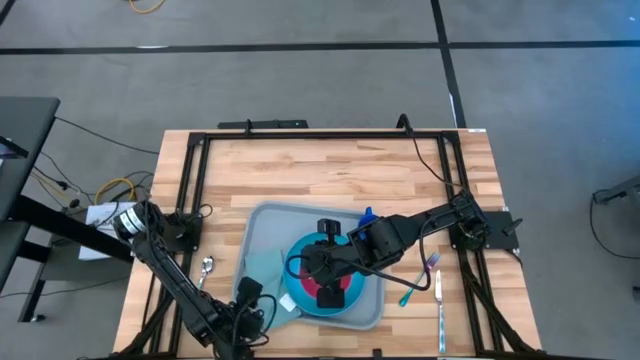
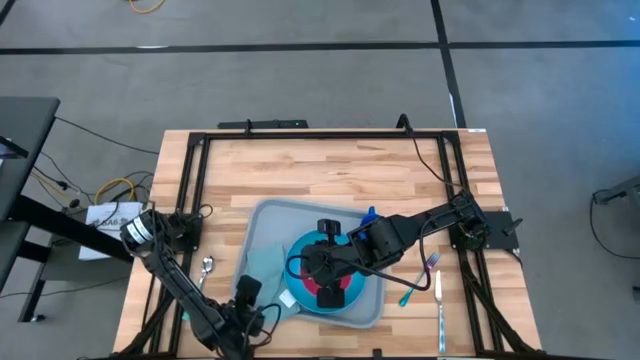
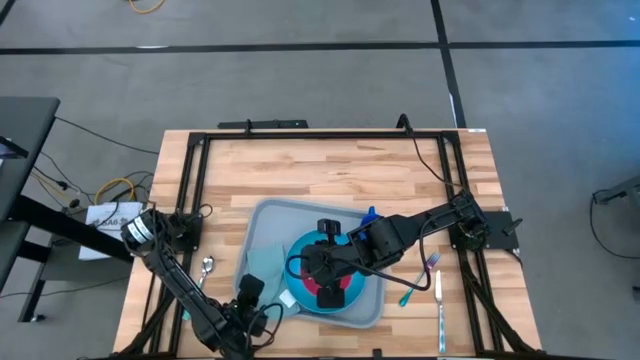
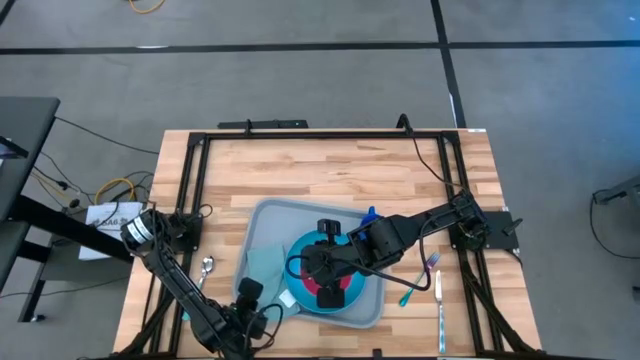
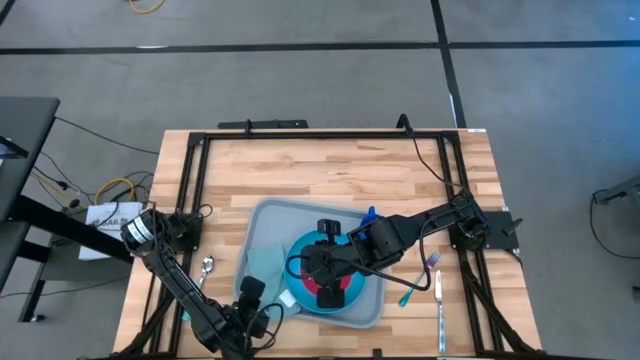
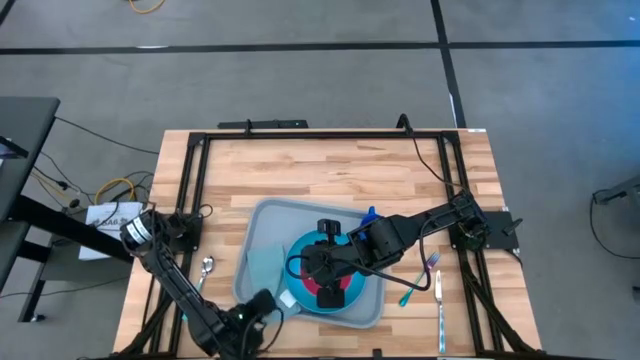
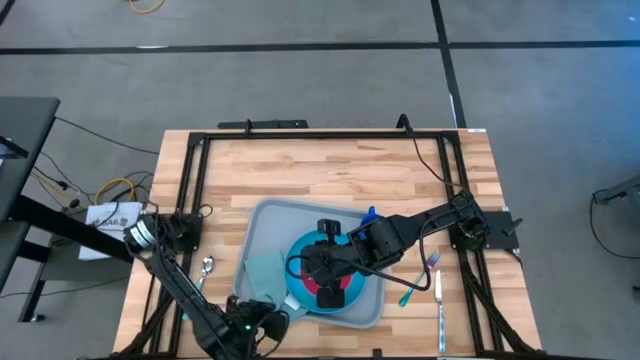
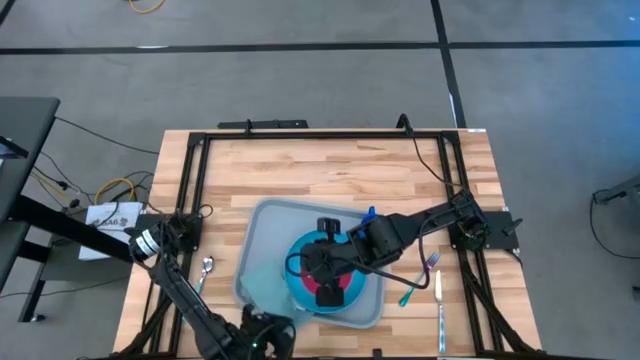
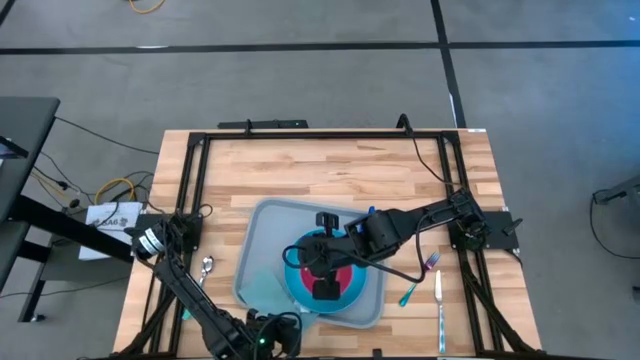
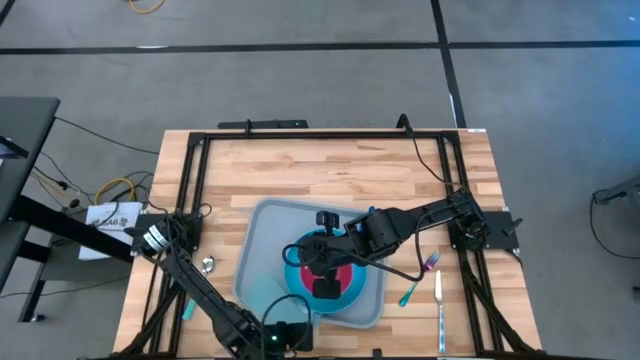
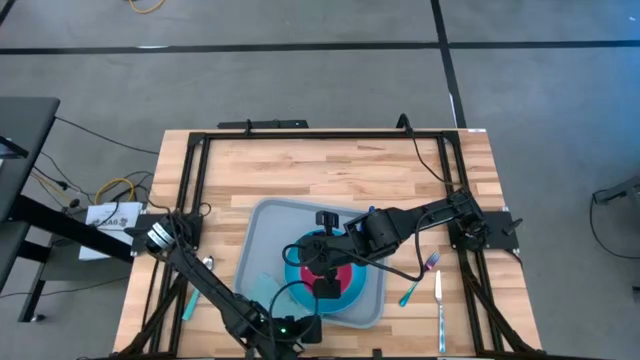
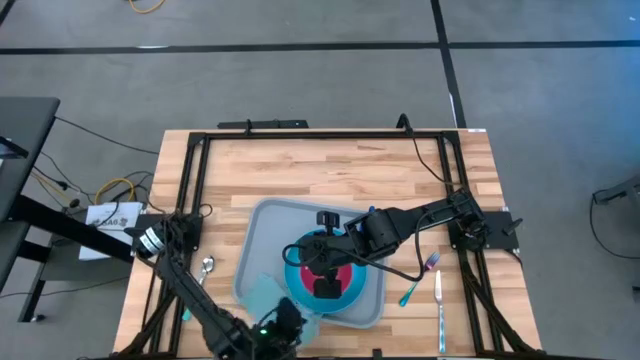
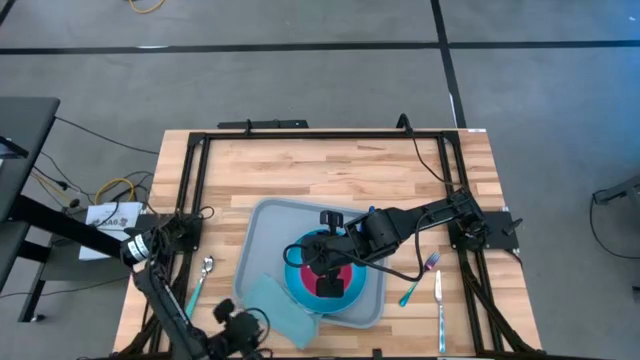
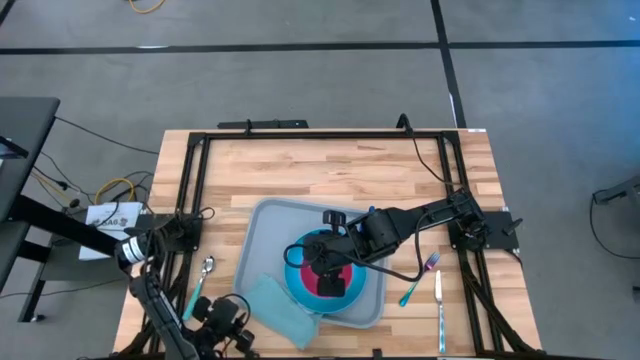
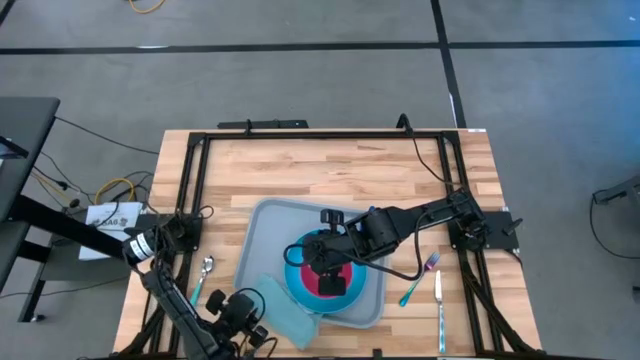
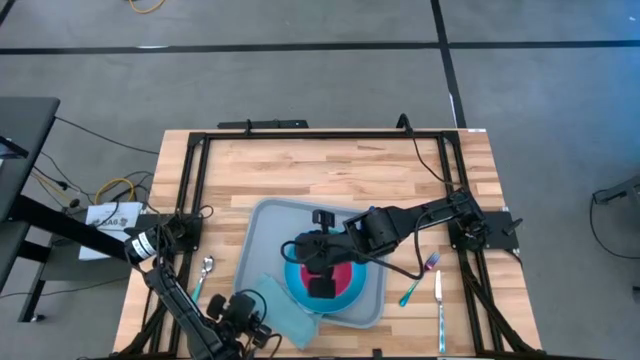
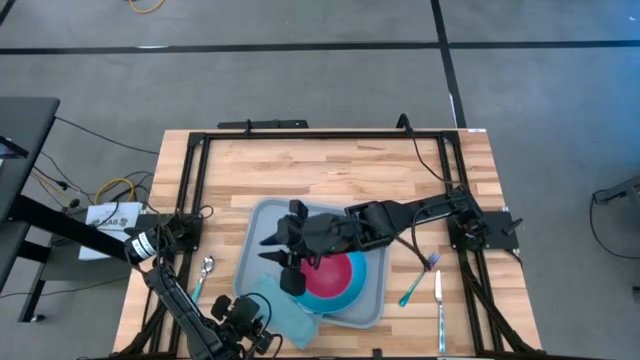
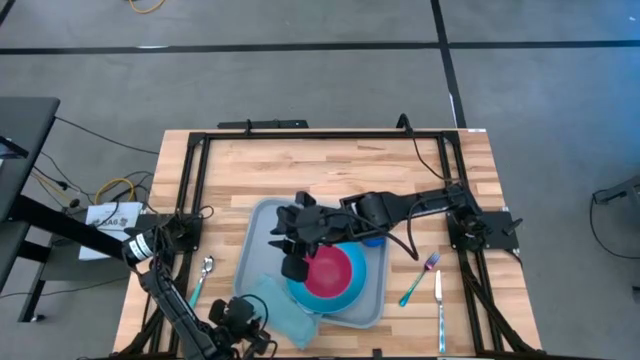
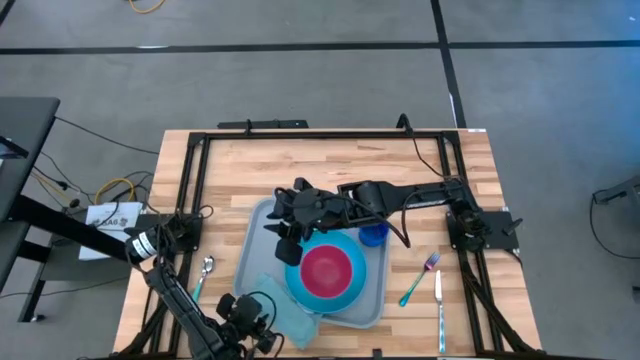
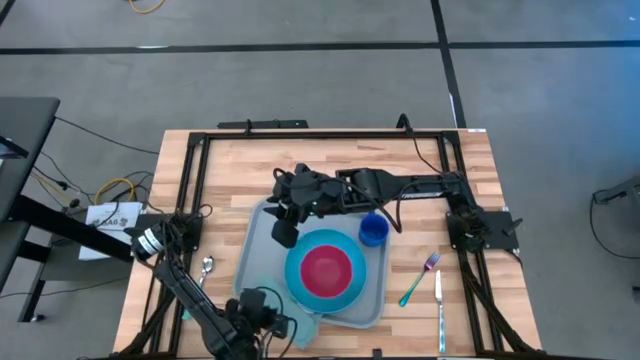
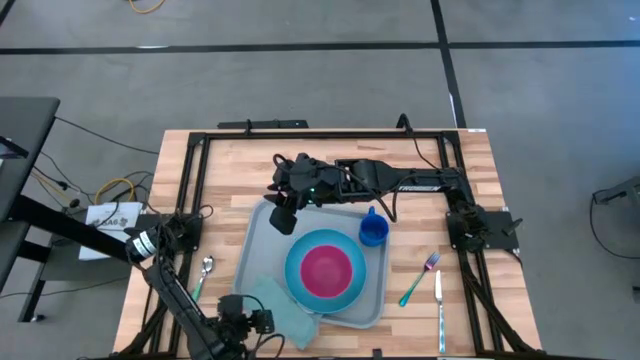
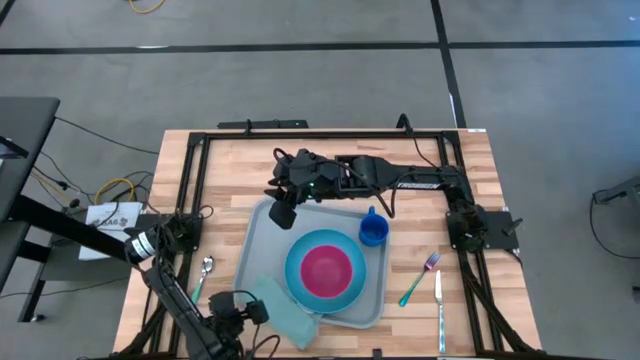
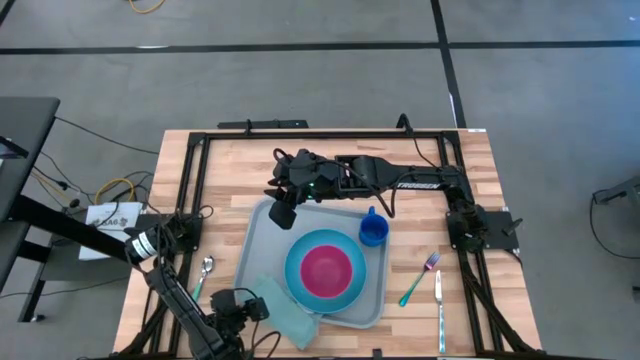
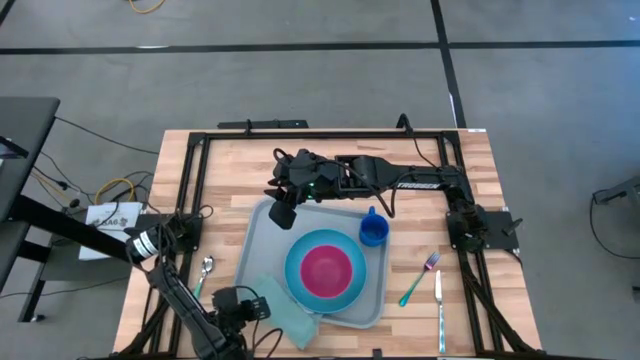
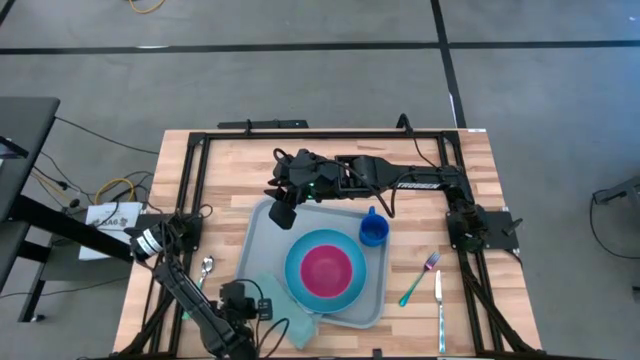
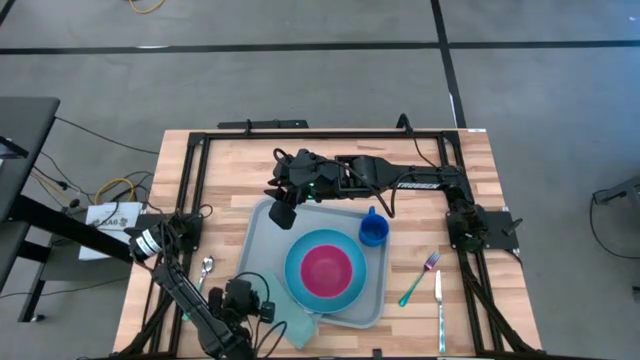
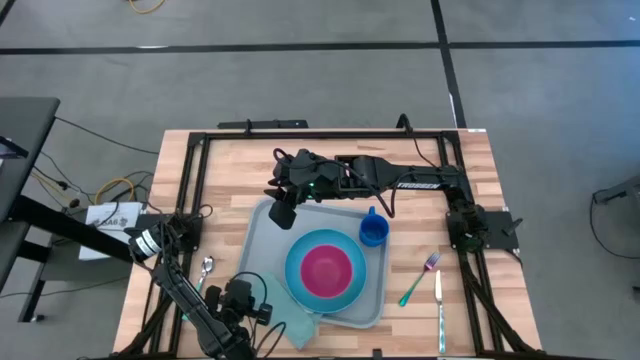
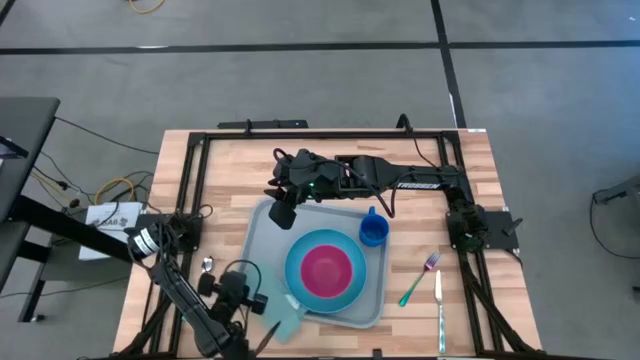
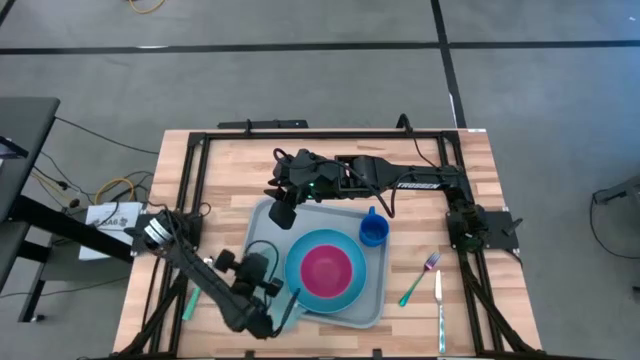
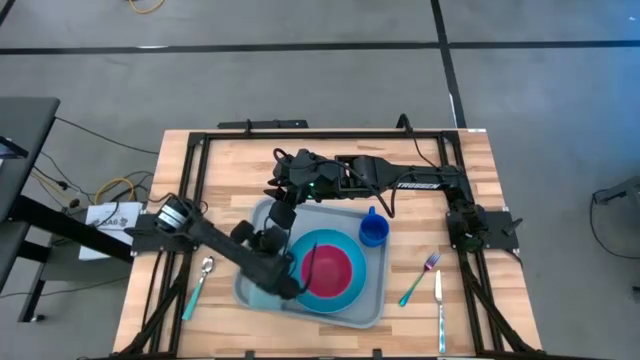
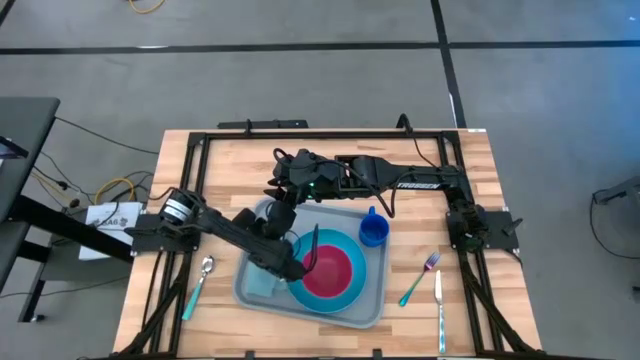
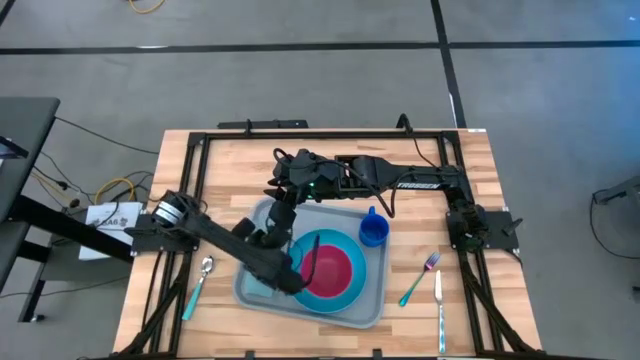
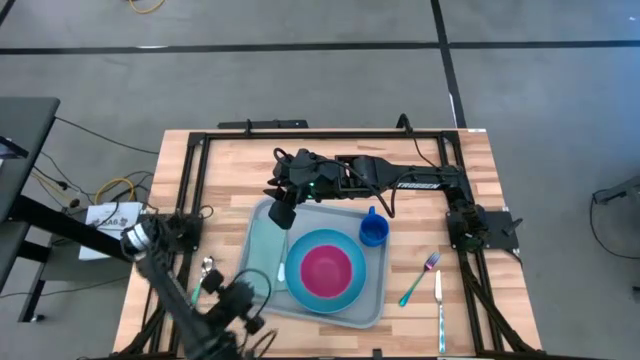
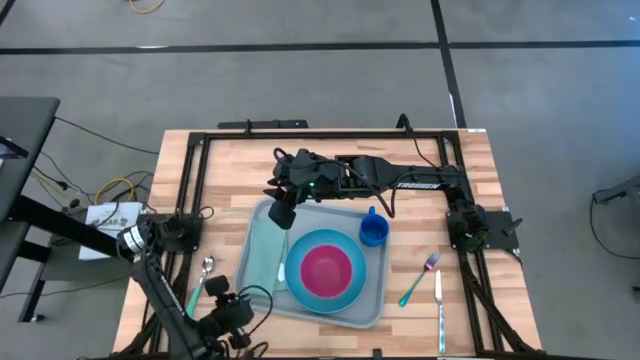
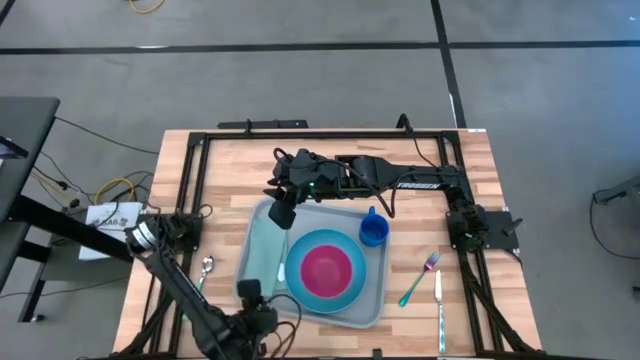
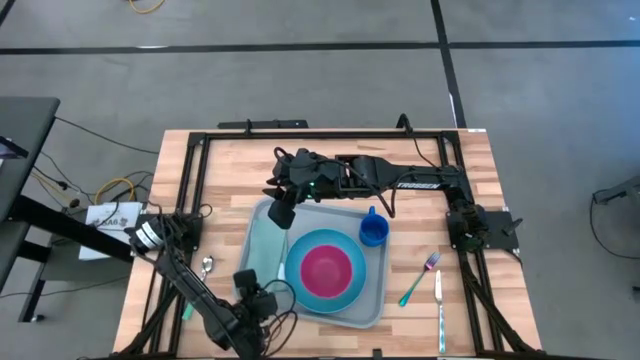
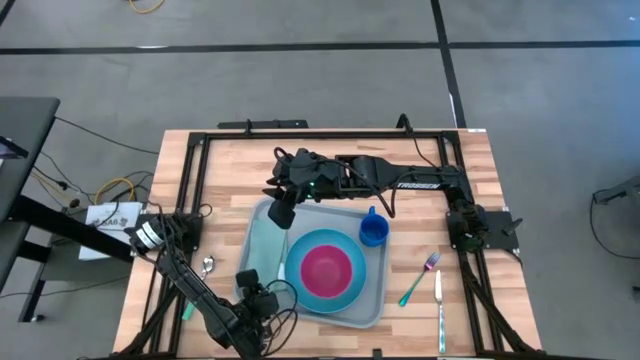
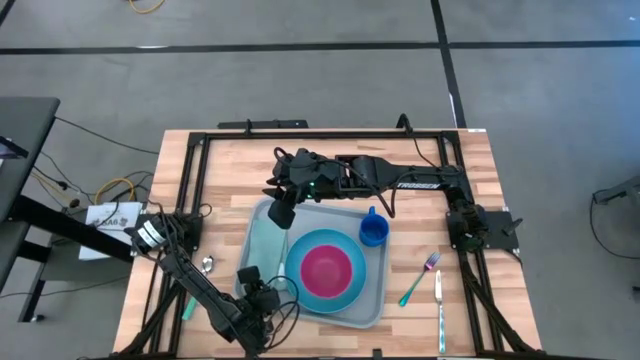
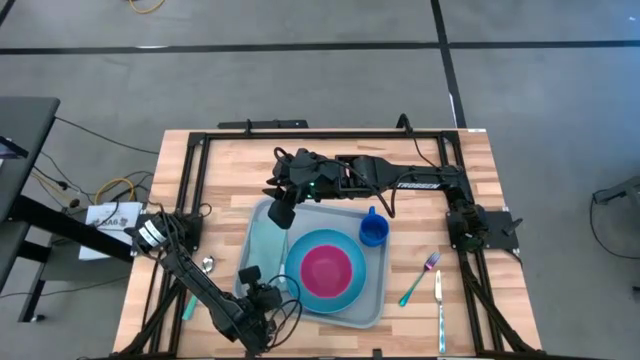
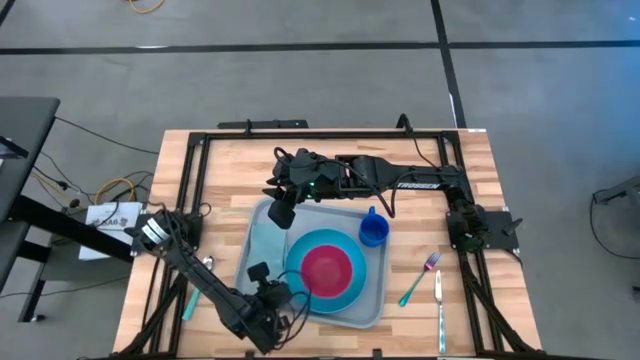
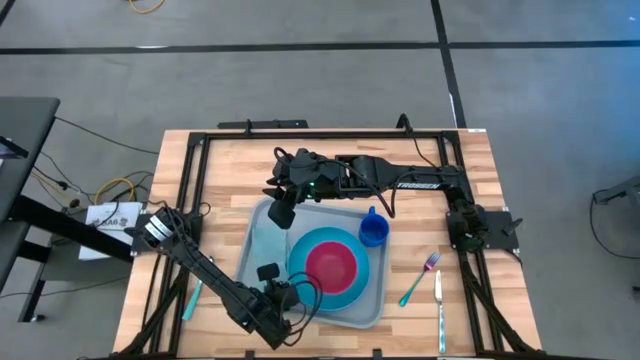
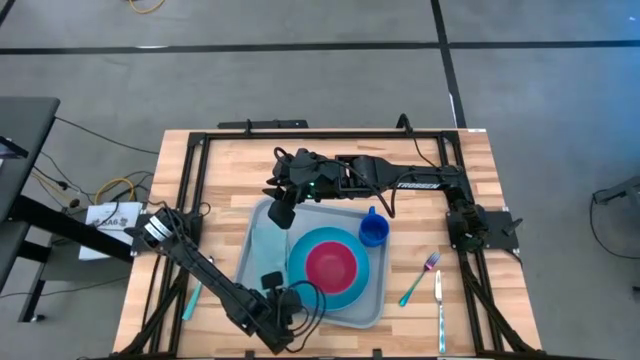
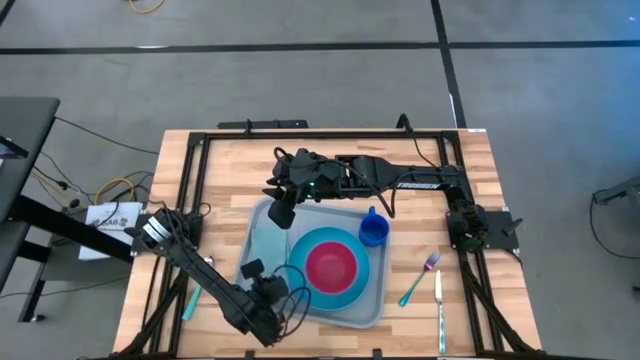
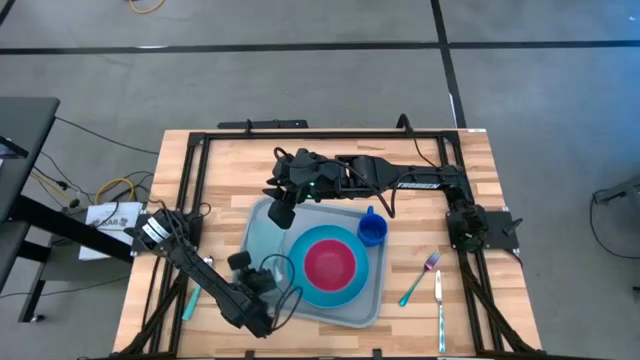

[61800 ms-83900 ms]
Task: Set up tray
Adjust the green napkin on the gray tray
